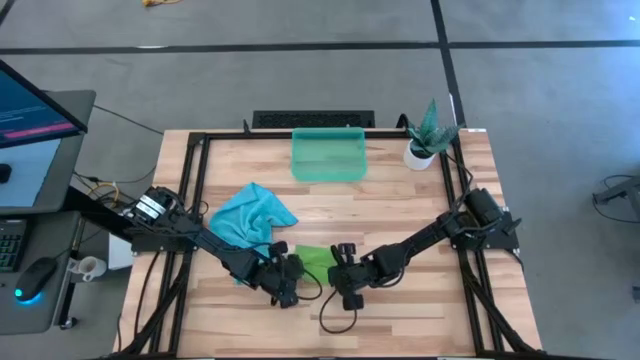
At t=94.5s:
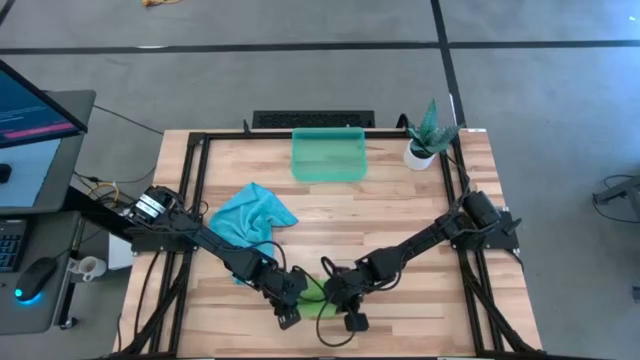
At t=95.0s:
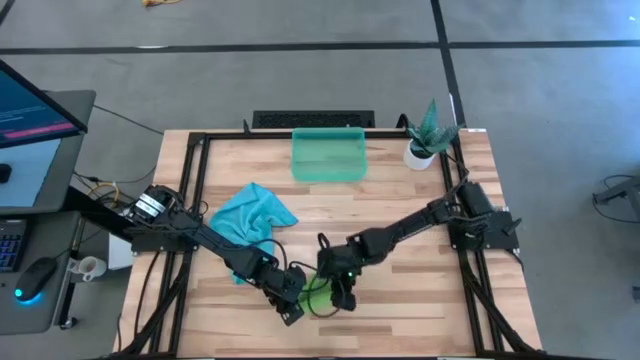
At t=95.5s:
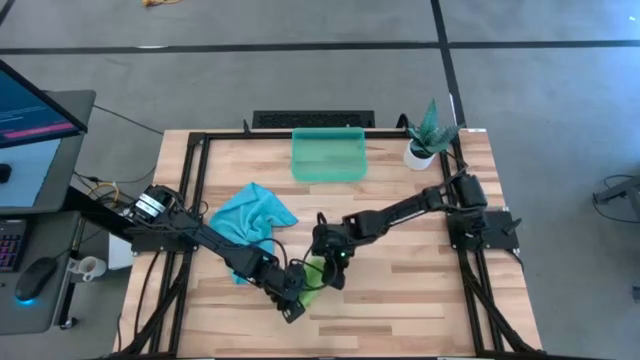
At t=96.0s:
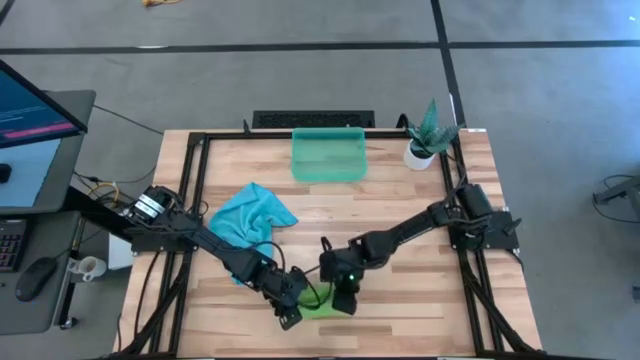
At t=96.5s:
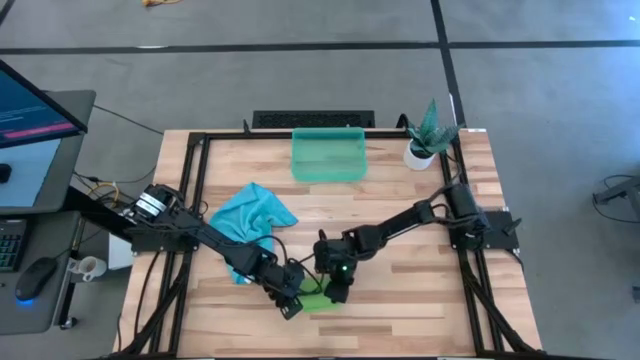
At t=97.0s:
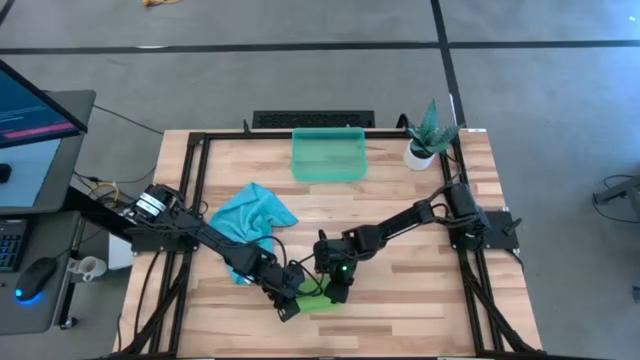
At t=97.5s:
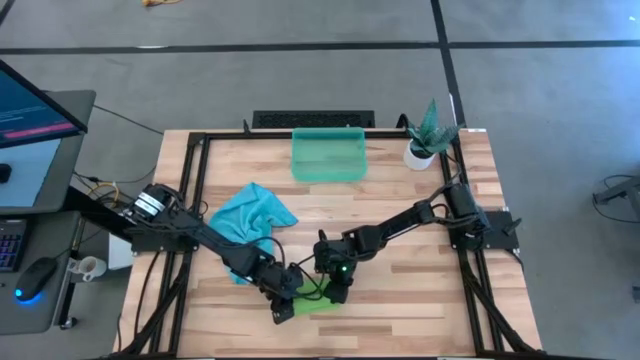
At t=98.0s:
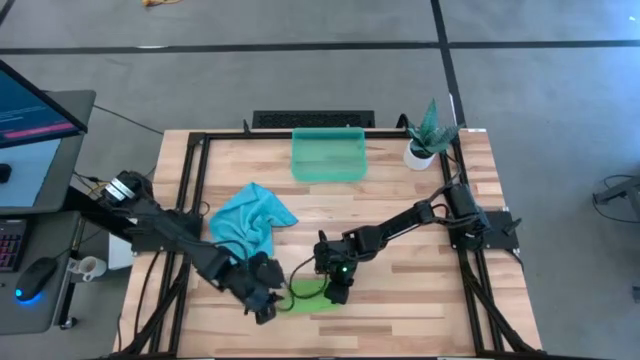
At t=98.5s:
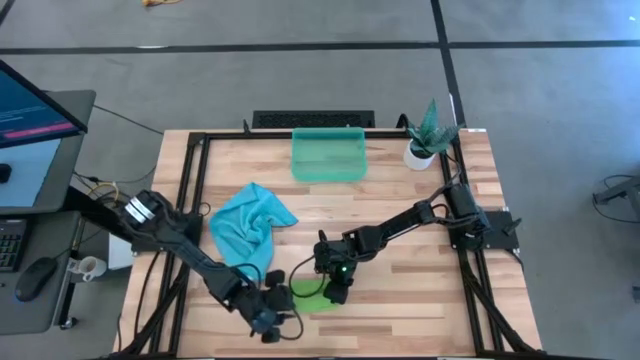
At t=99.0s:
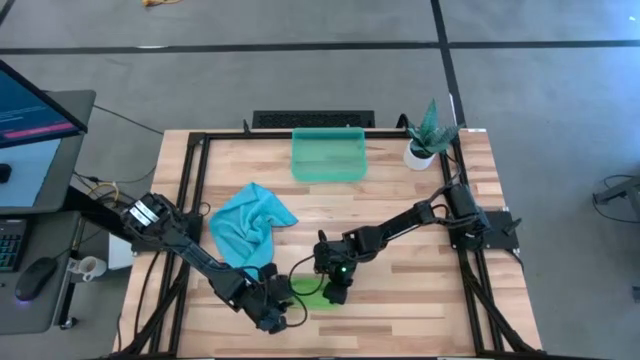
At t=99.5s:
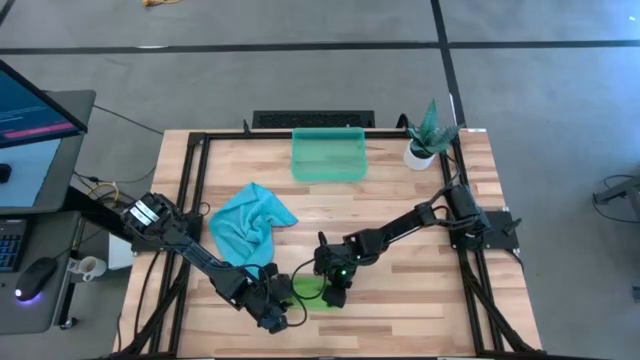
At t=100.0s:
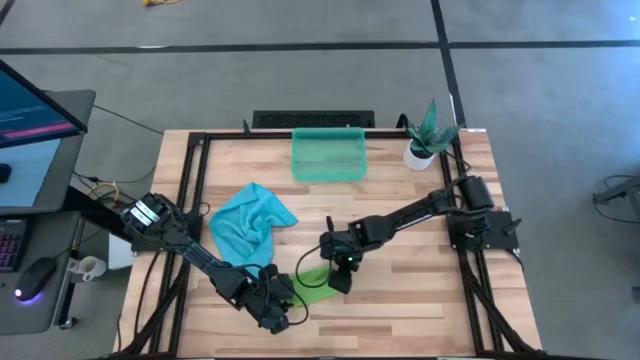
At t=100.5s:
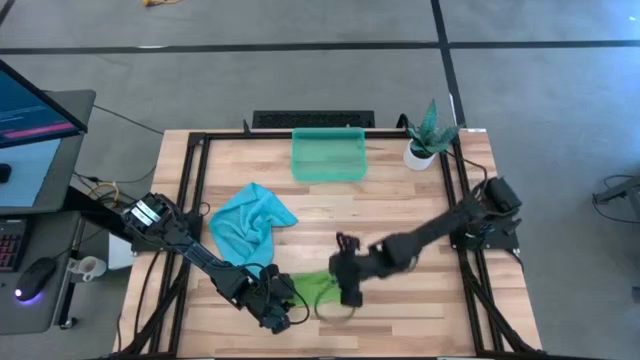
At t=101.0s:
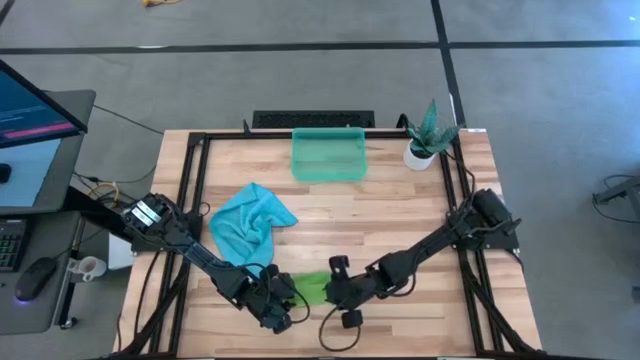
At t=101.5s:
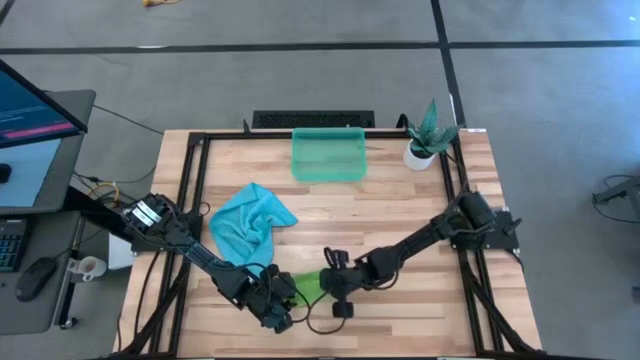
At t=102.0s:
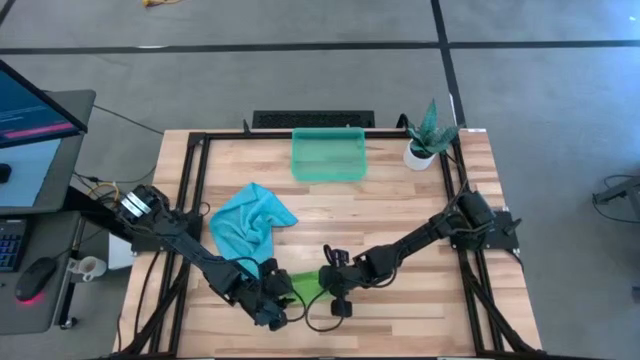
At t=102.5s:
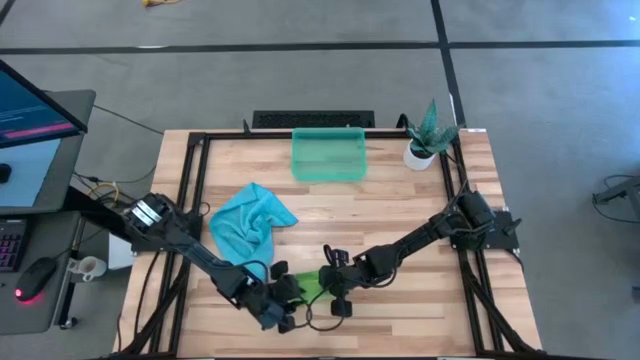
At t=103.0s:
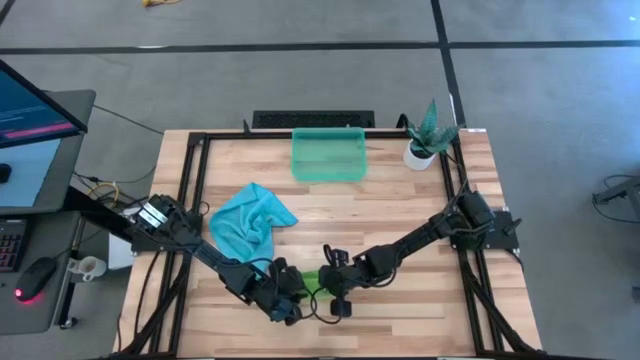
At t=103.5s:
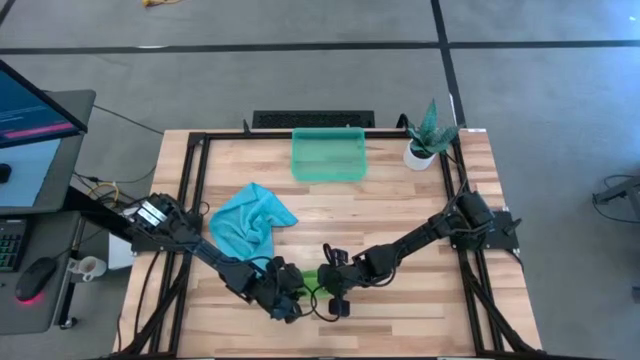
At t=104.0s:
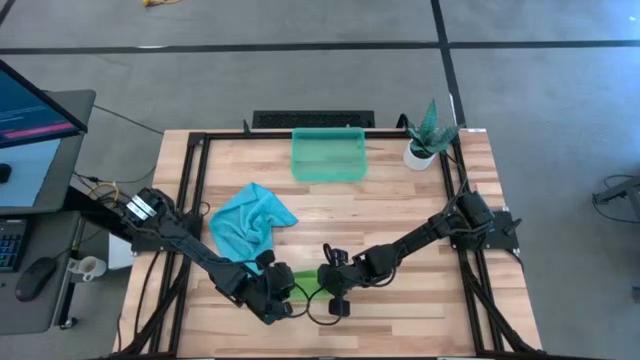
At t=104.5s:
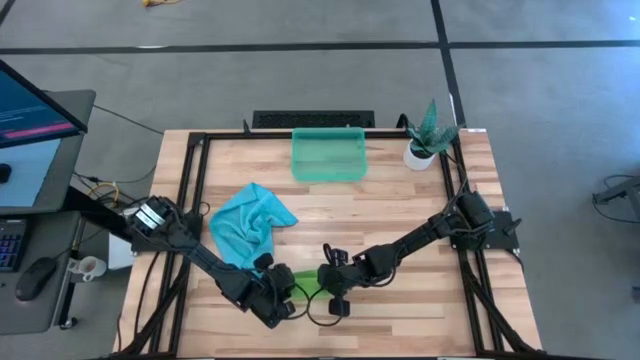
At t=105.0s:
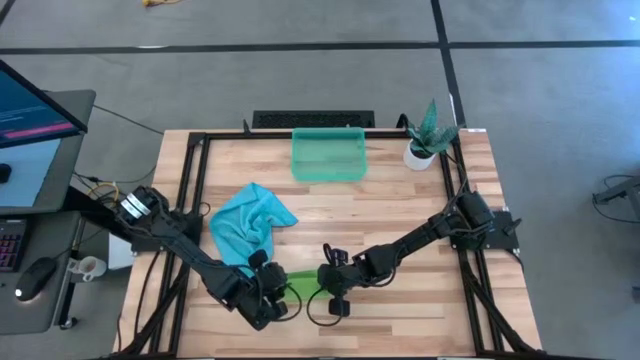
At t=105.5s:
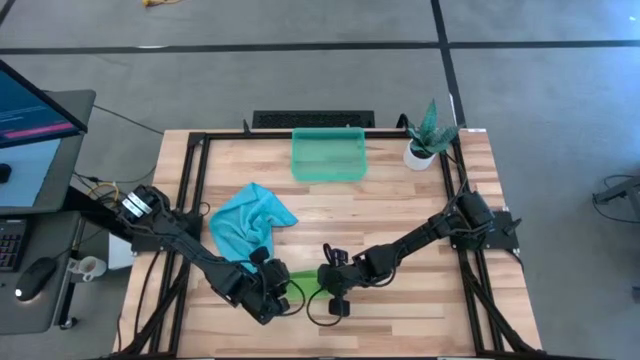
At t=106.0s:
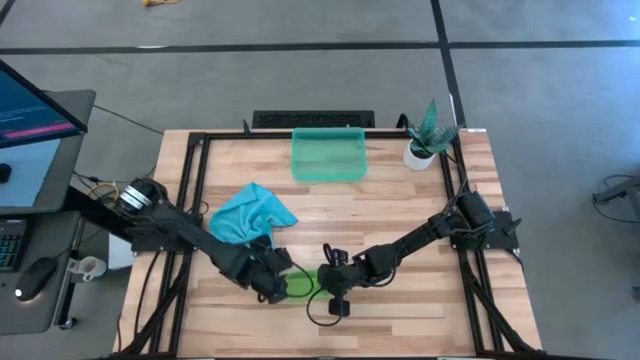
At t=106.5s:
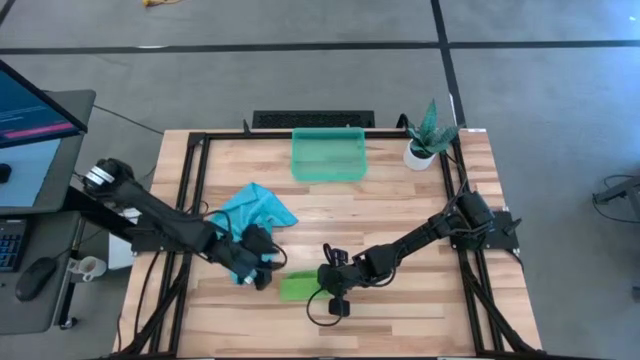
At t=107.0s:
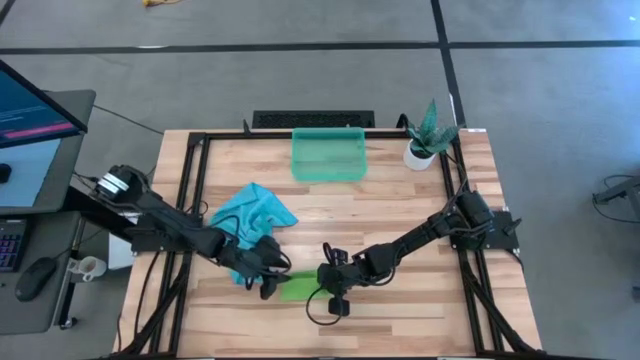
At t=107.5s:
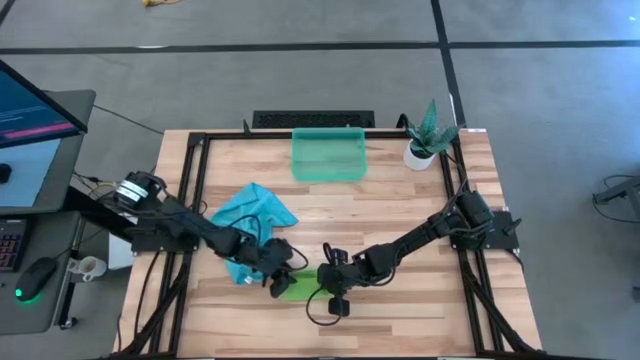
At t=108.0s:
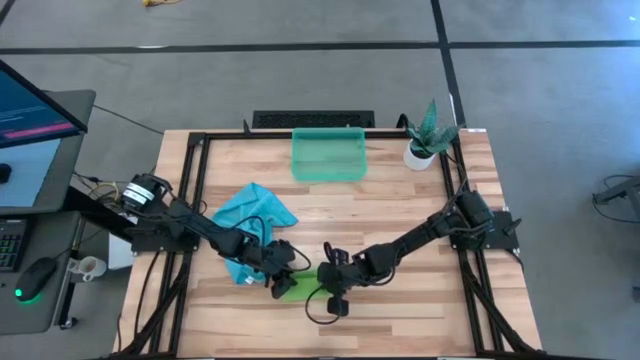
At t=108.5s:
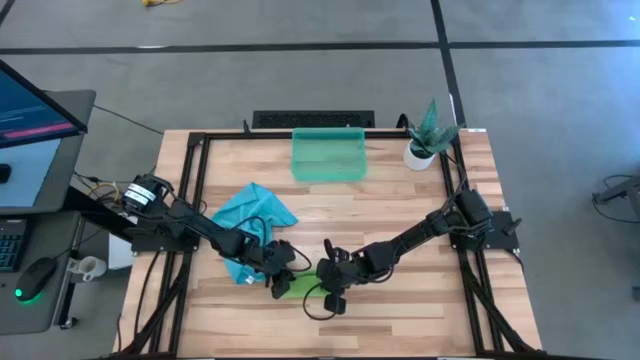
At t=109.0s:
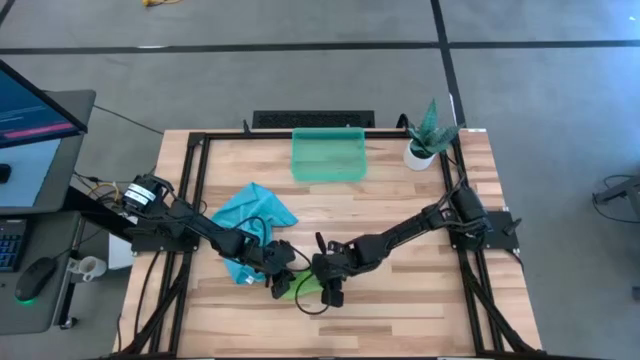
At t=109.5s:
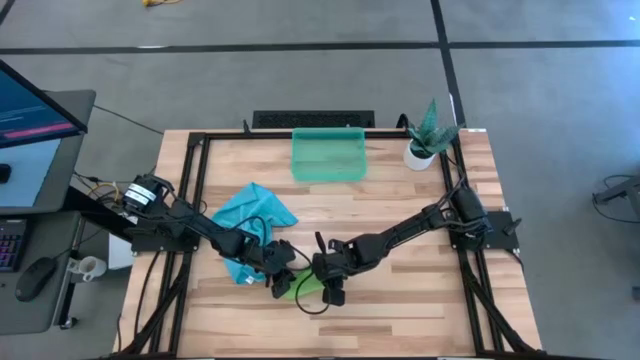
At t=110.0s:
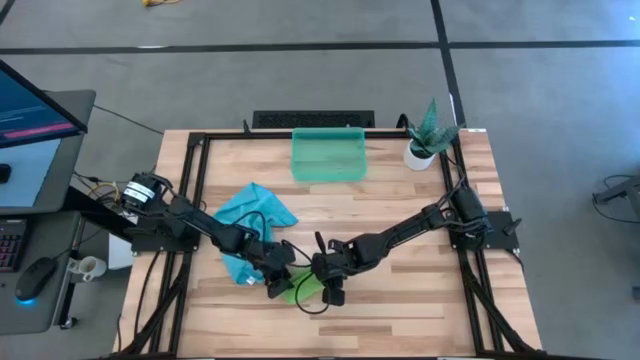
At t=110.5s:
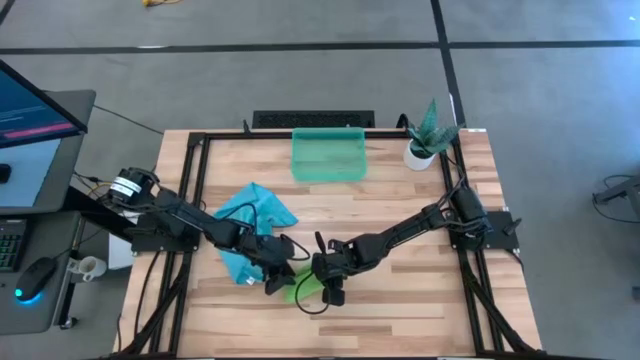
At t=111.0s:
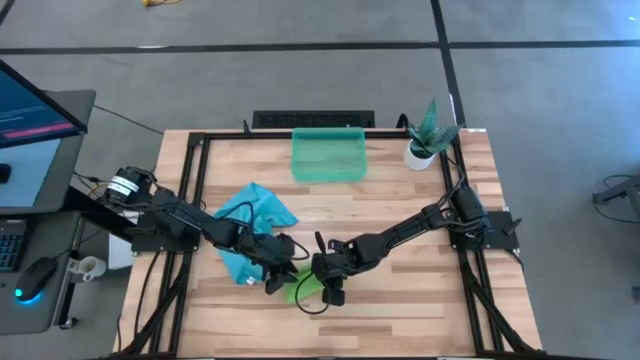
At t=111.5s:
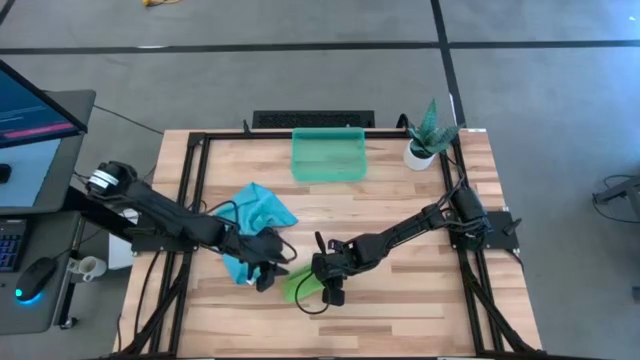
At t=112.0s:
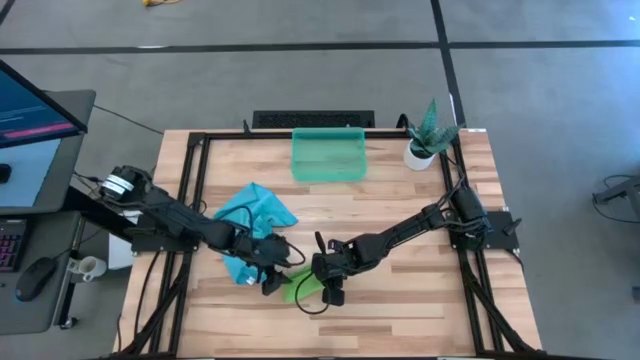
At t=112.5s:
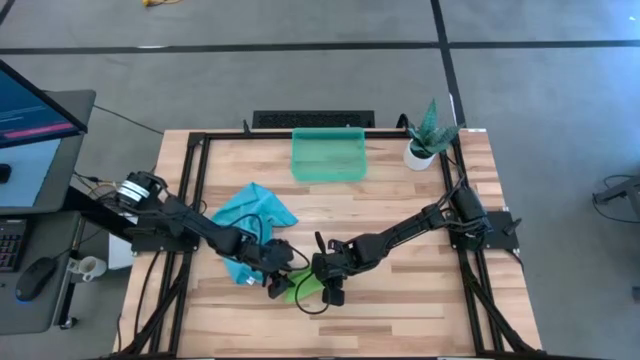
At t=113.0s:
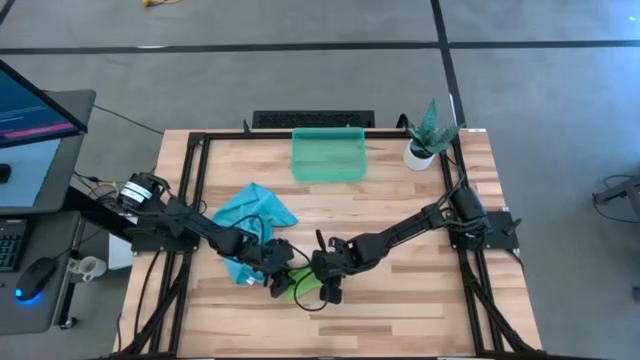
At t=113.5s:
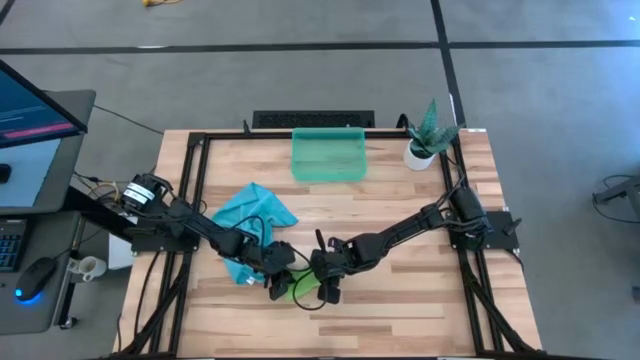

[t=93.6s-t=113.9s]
Task: Roll microfiber towels into tight, uniform cylinder then place into a basket
Roll the green microfiber cloth

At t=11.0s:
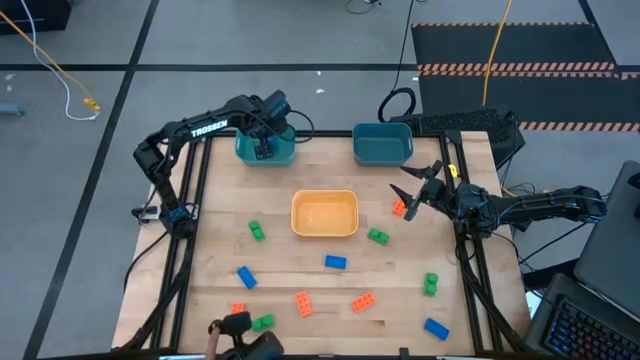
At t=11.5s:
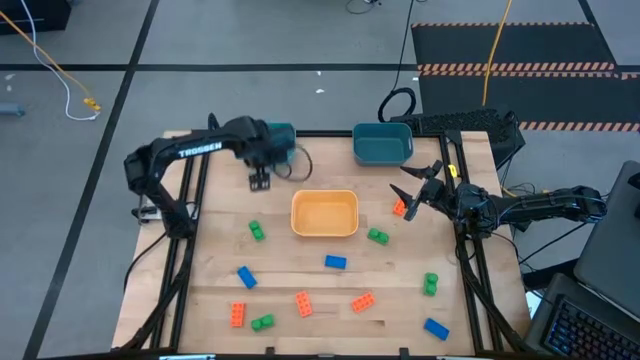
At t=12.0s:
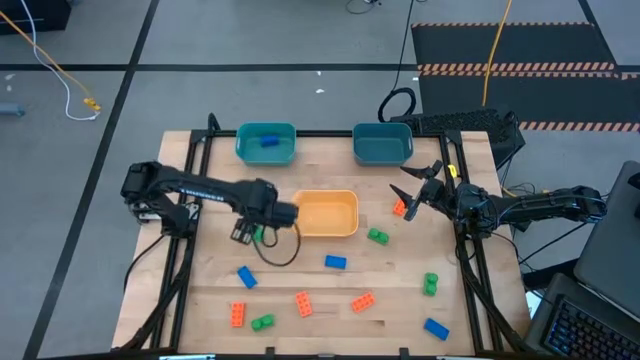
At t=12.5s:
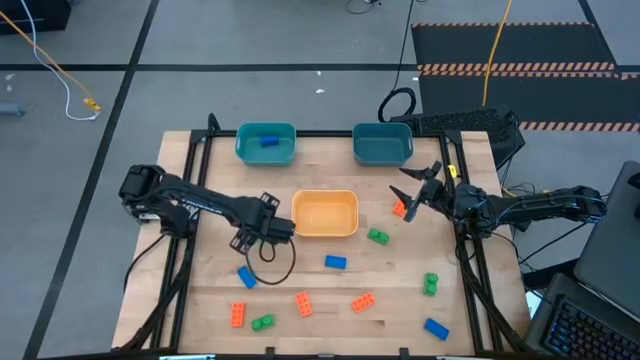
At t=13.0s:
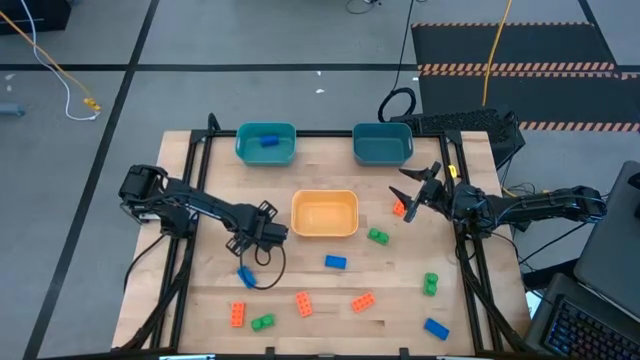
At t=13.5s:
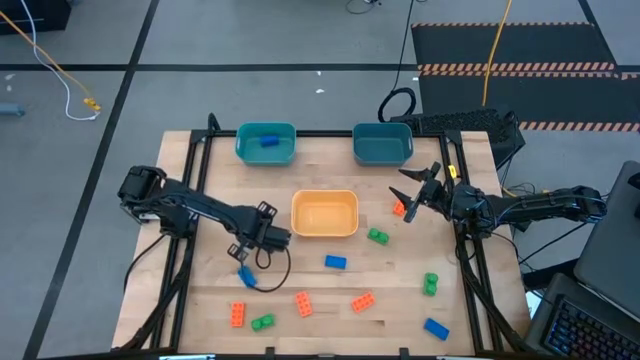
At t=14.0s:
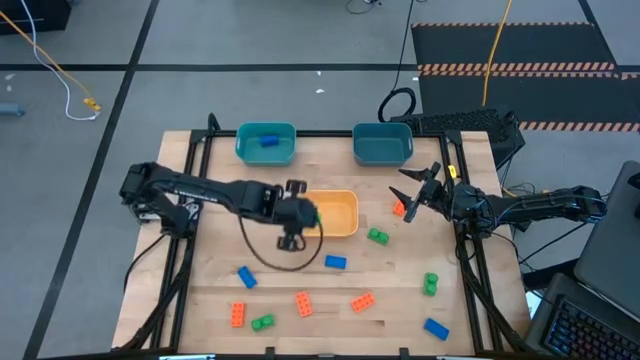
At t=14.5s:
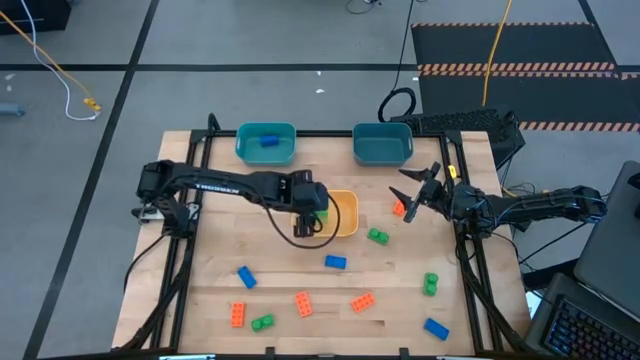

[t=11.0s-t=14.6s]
Task: Sort & place blocks by color
Put the green game piece into the yellow bin
